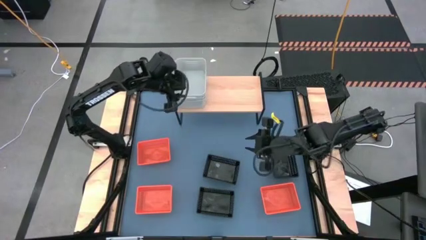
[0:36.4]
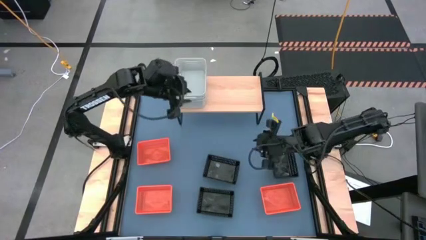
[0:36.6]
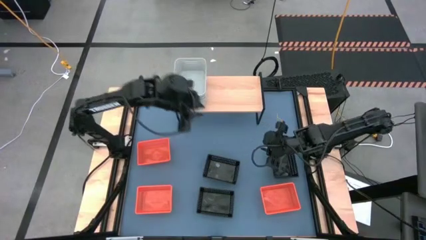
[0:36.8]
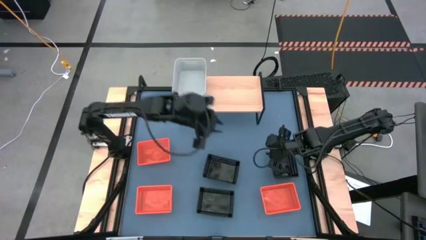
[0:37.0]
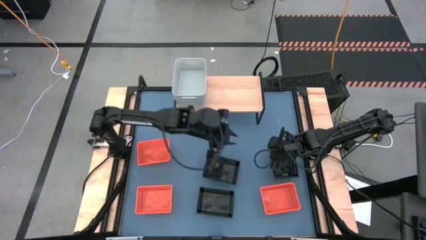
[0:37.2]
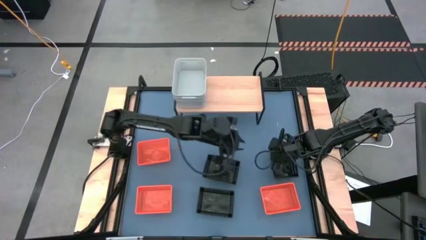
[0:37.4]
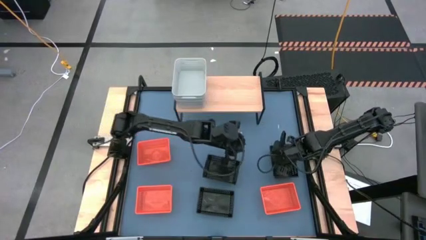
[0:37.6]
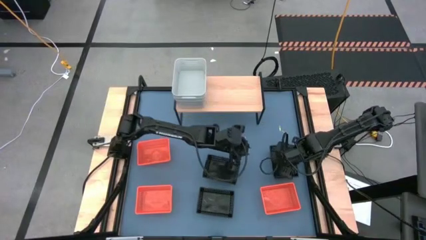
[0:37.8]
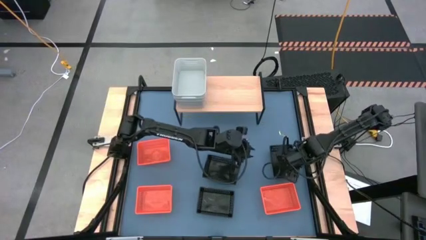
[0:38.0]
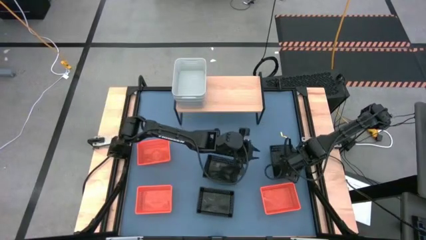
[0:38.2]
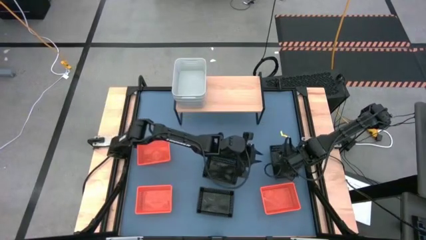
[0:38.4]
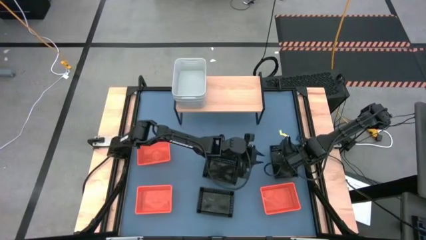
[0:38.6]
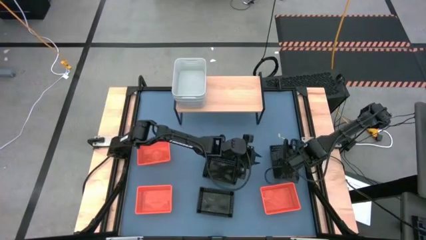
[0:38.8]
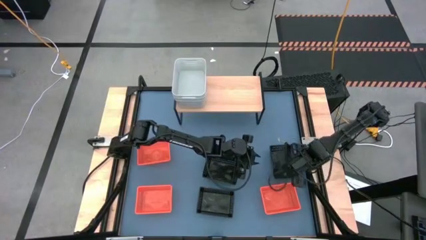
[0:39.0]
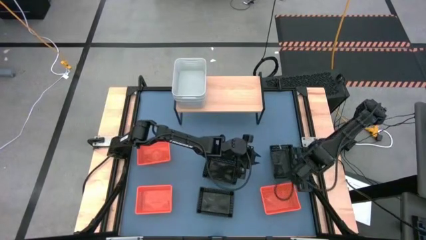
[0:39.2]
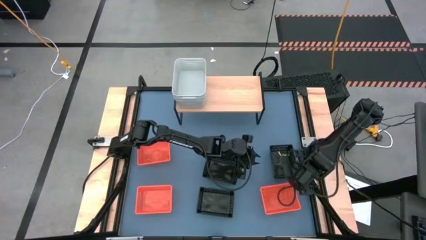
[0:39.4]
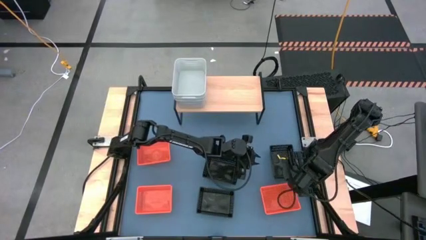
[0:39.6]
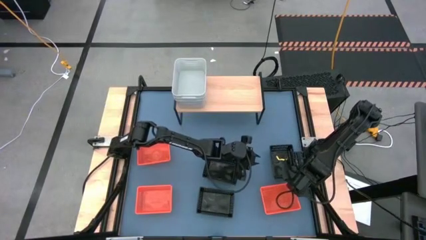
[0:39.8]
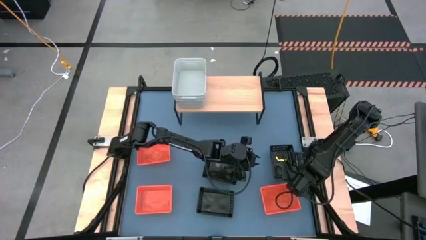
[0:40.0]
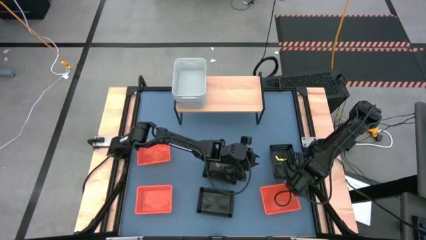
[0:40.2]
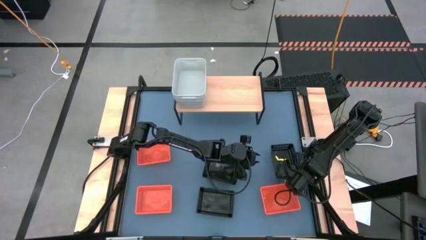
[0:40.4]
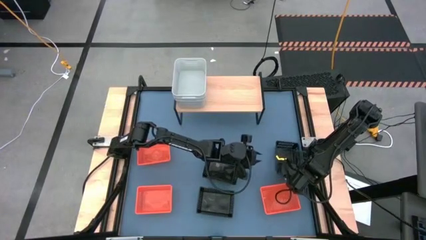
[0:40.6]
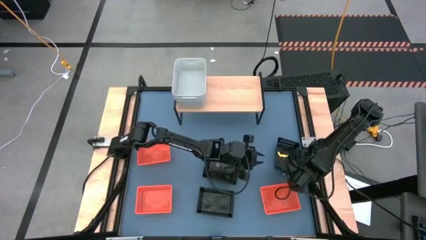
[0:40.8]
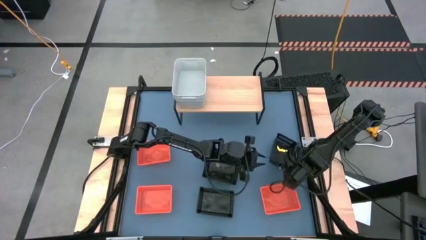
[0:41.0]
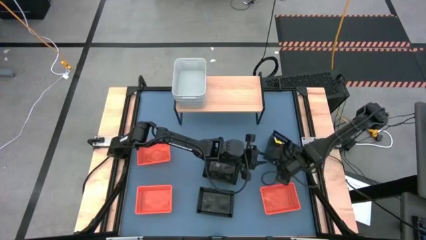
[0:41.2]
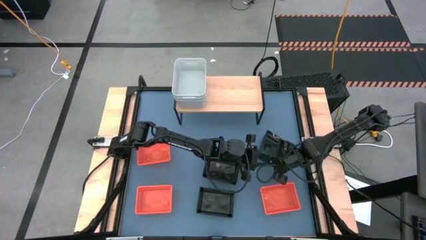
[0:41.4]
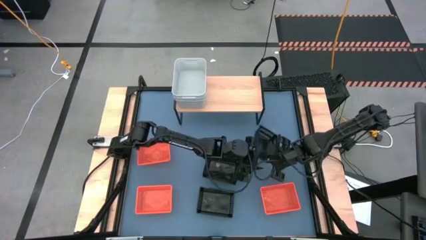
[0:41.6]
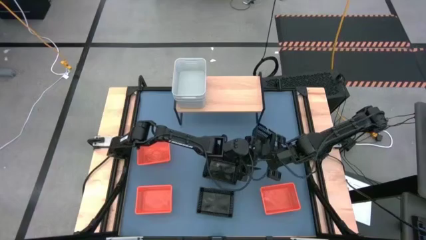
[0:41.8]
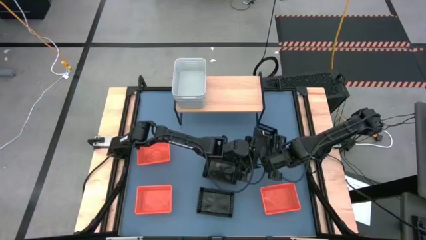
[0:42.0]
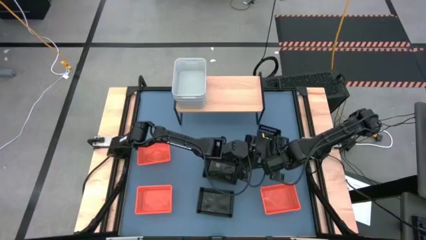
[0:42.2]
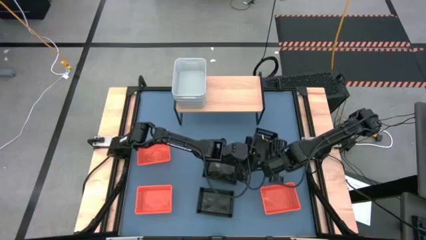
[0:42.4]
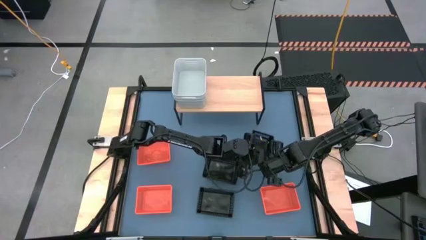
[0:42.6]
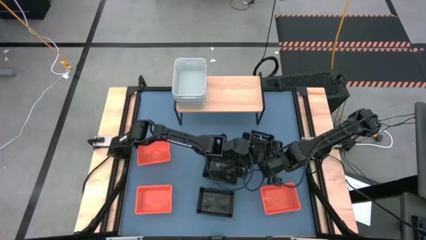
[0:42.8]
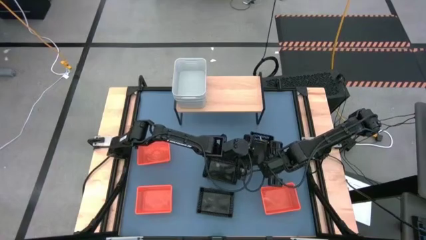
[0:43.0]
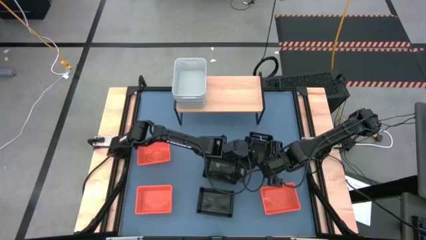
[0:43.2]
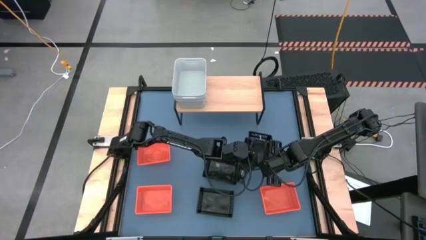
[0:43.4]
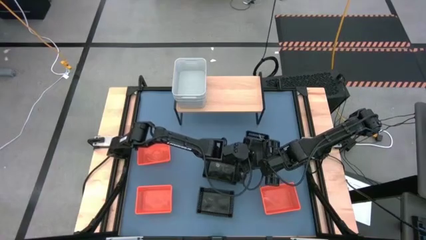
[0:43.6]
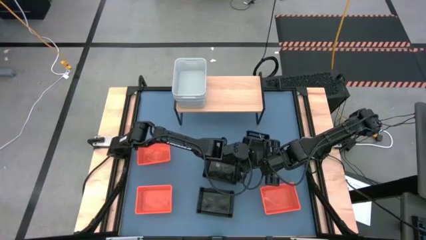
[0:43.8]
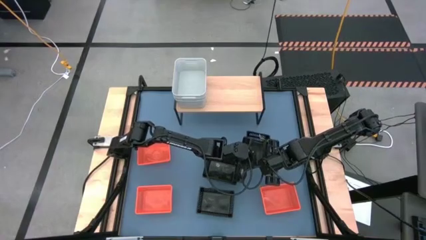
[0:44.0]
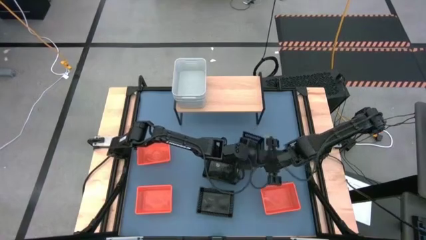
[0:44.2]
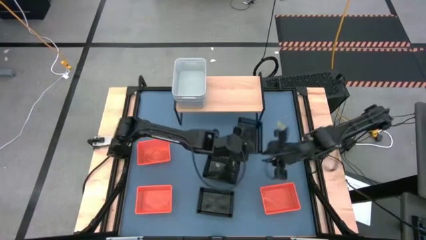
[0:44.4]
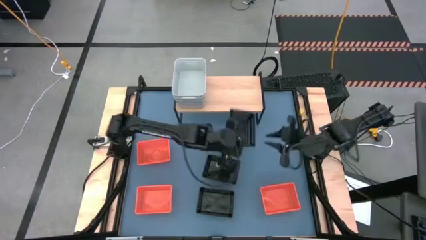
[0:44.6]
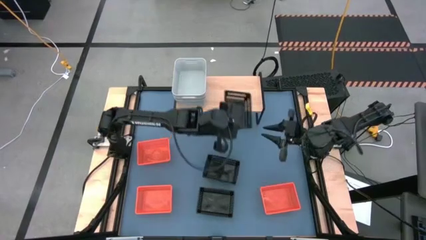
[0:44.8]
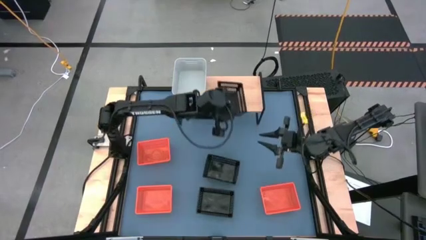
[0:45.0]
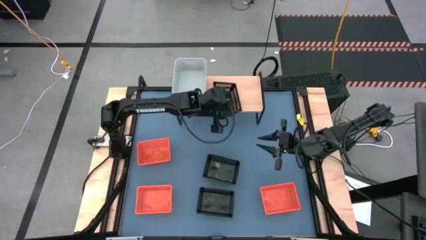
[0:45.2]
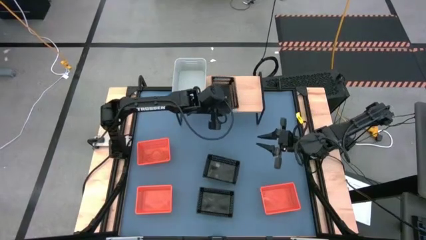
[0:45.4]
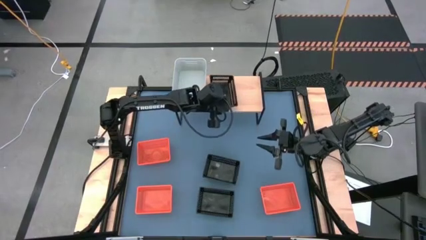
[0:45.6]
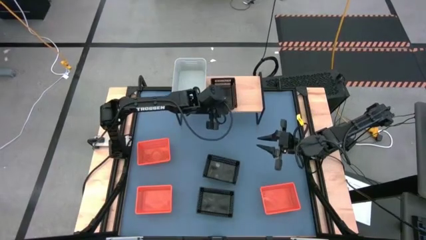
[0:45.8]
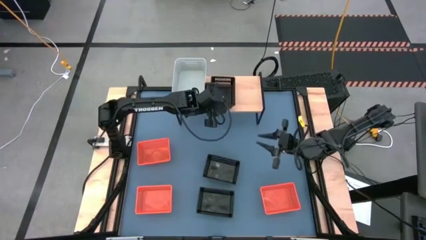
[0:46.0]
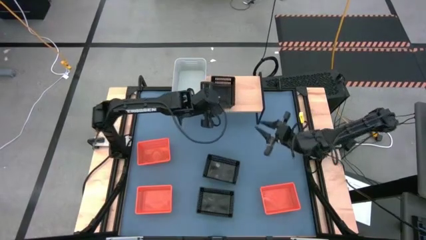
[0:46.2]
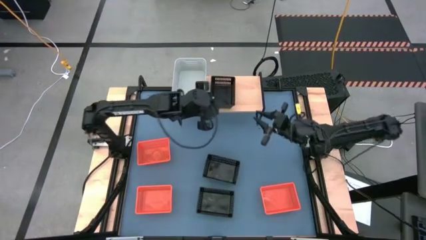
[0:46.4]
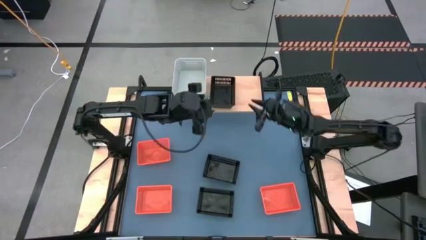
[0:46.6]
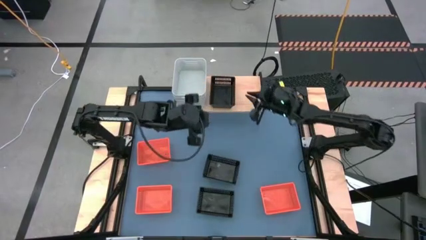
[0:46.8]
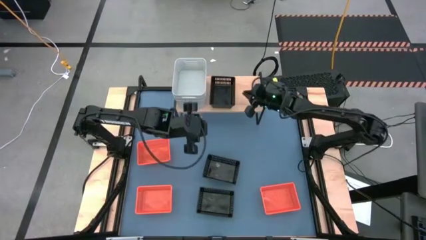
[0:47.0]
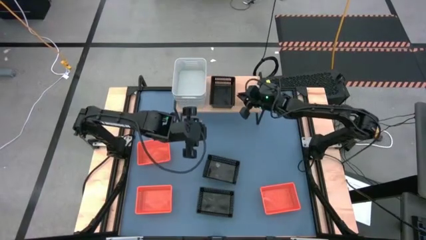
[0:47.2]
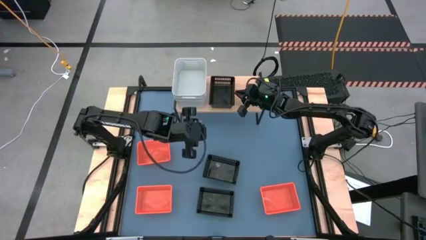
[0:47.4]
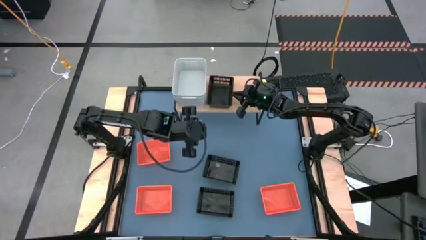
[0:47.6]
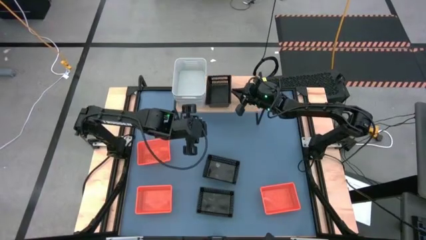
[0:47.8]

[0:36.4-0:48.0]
Task: Stack baskets on shelf by color
Put the top right black bin on the shelf

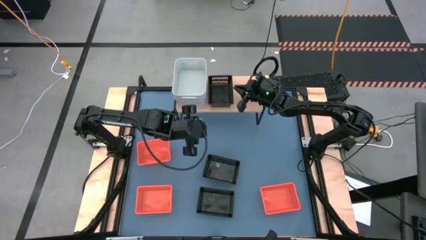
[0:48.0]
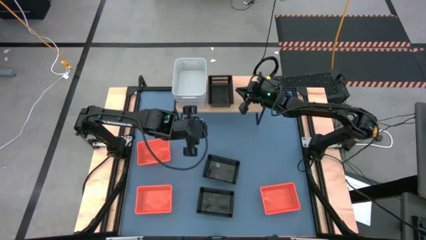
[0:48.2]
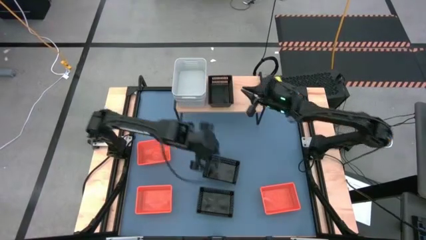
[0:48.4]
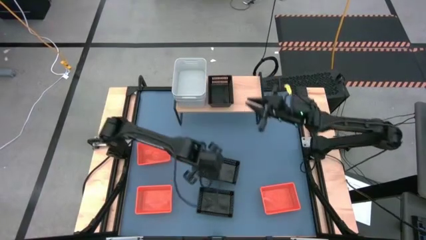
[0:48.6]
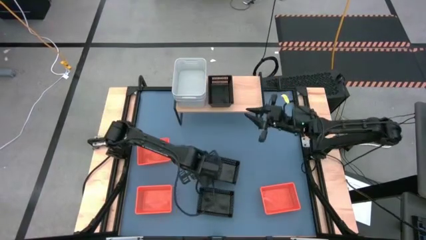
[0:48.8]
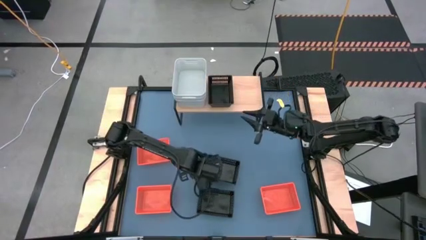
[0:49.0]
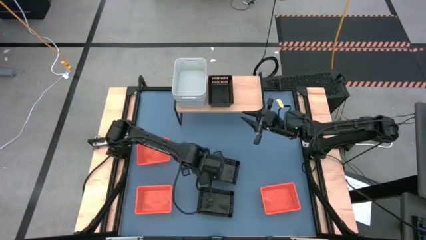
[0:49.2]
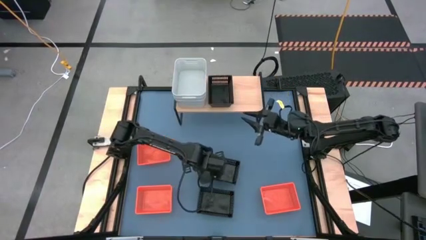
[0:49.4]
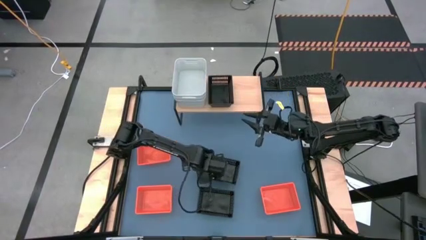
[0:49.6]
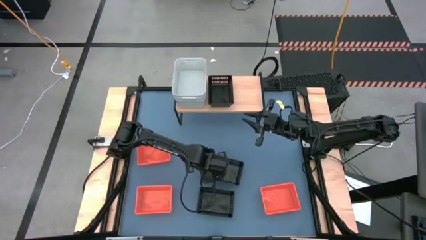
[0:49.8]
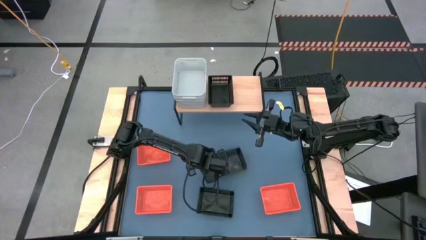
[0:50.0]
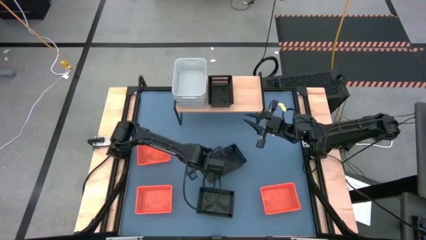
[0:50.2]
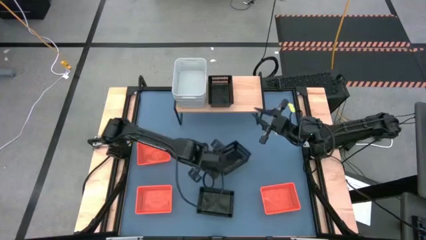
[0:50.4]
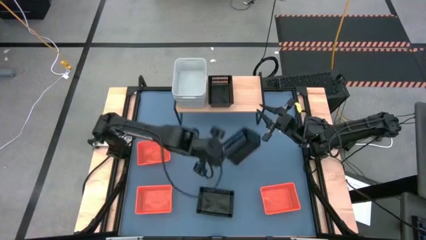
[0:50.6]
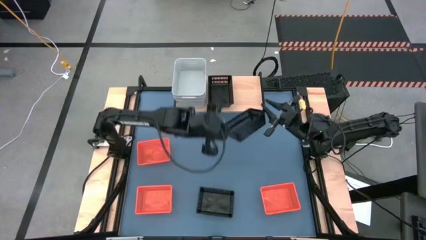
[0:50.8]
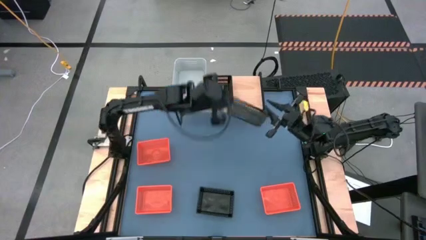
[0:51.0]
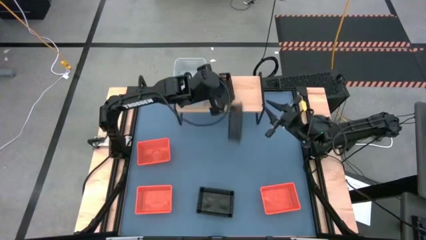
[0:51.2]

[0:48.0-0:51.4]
Stack the top black bin on top of the other black bin on the shelf
